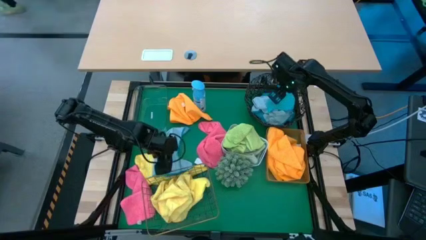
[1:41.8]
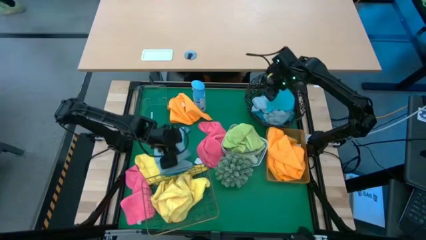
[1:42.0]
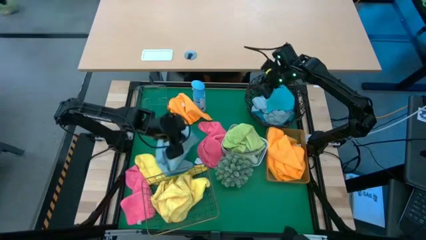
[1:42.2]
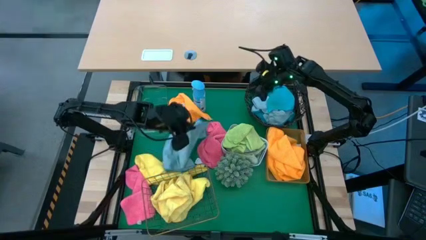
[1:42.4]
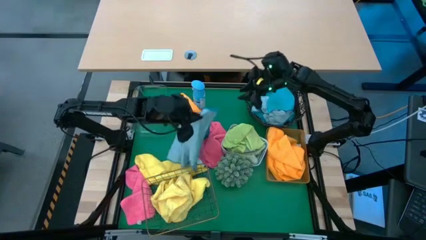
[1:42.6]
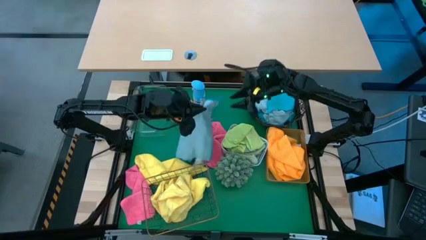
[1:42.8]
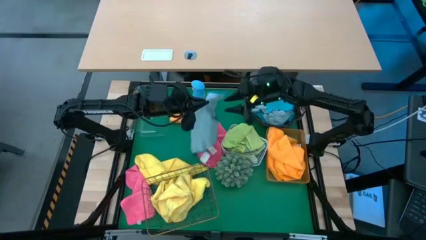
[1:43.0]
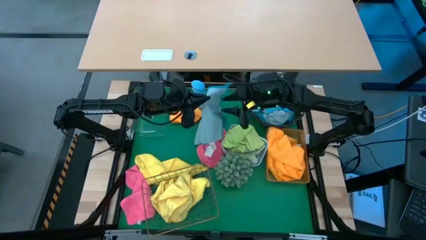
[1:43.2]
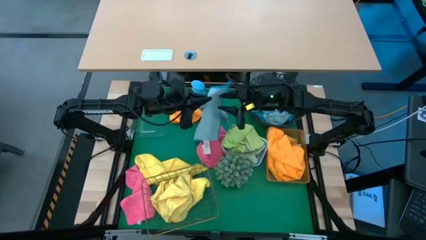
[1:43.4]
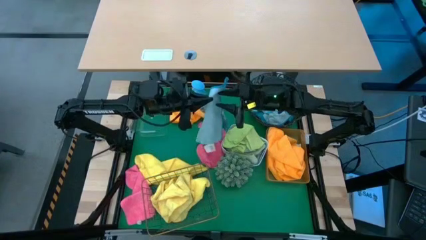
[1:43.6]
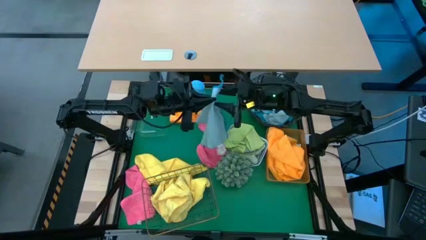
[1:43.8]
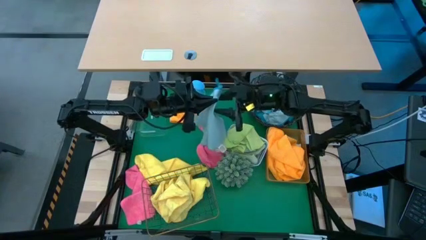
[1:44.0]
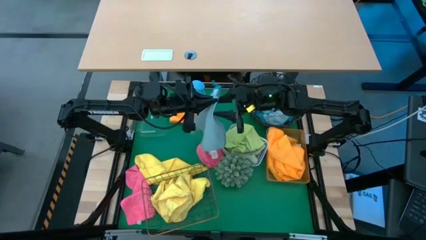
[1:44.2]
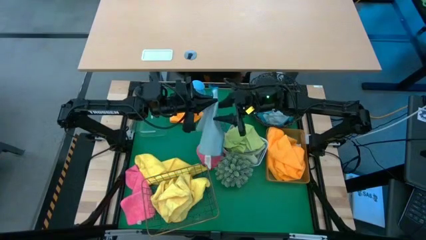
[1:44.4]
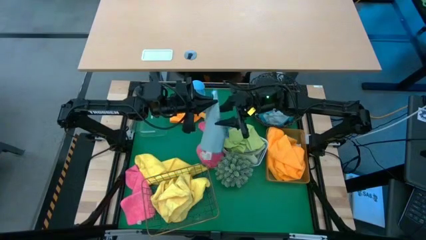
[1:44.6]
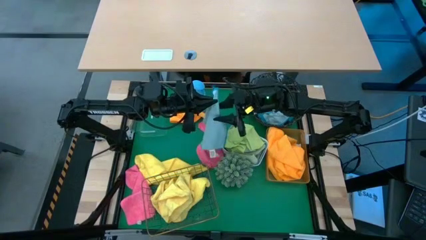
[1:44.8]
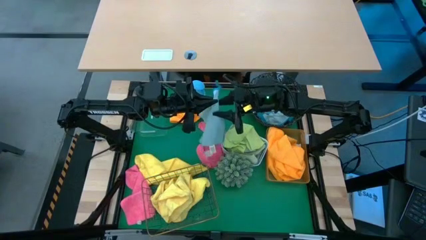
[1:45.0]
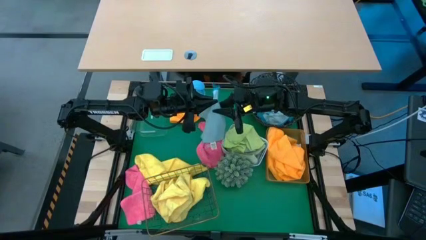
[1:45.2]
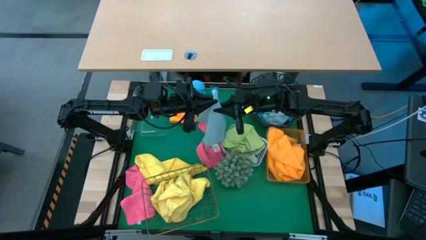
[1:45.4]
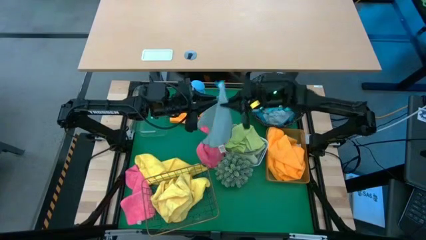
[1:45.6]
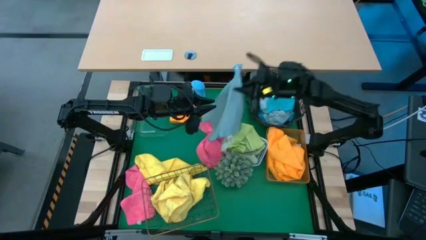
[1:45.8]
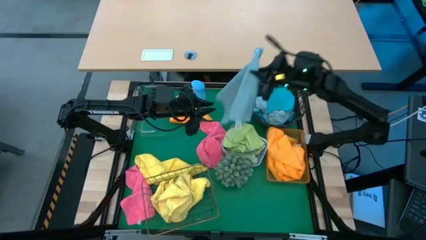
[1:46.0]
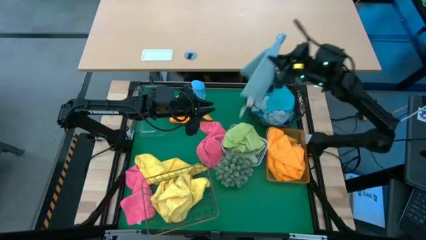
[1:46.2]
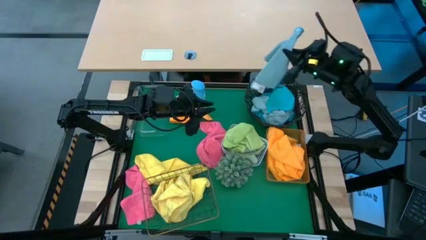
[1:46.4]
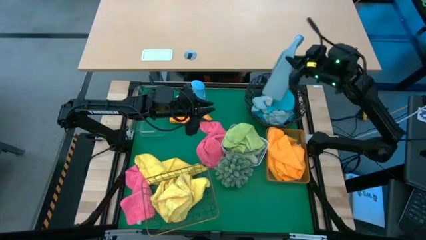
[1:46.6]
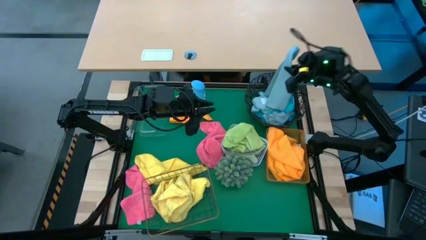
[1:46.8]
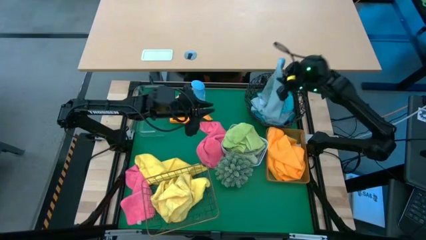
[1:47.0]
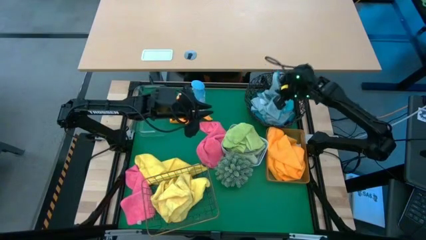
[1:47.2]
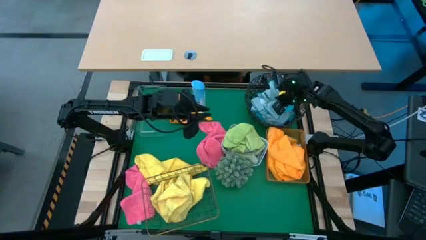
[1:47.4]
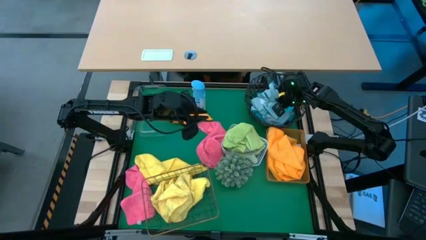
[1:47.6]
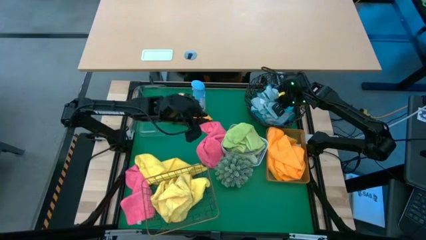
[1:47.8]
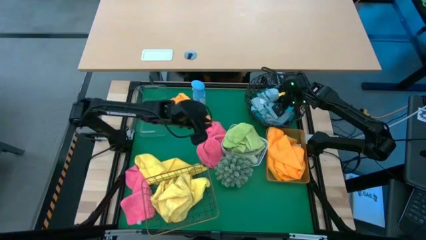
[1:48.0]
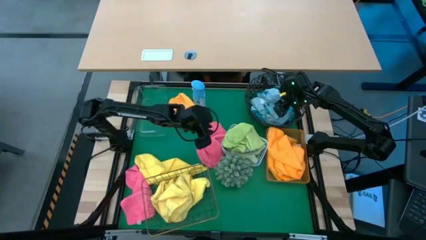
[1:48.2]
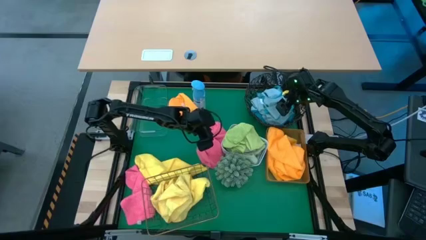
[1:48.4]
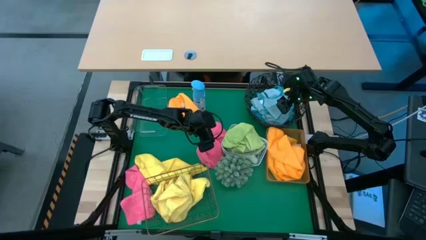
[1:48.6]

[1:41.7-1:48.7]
Task: Sort microfiber towel by color & place in baskets
Put the blue microfiber cloth into the black basket

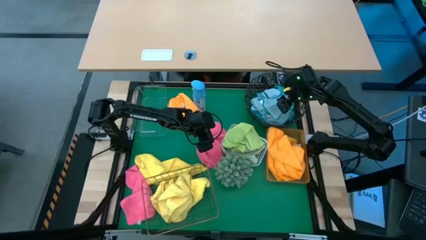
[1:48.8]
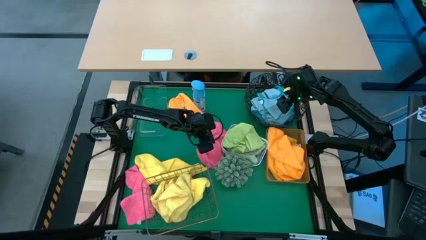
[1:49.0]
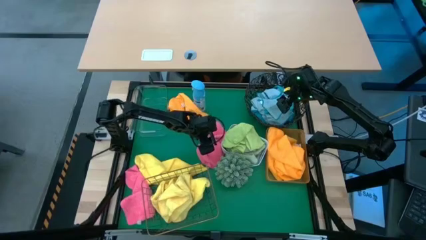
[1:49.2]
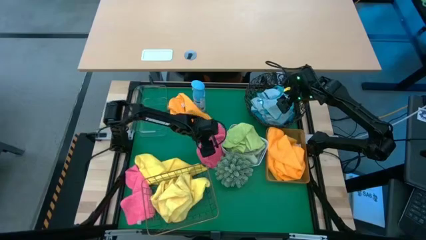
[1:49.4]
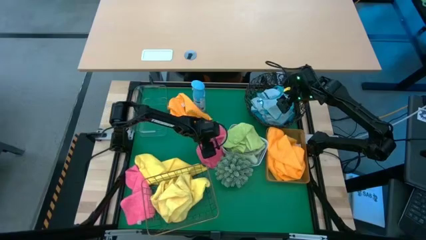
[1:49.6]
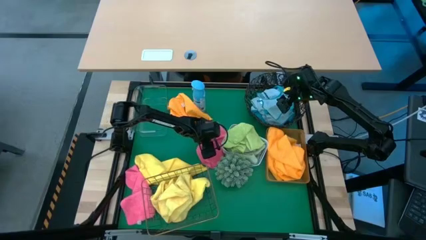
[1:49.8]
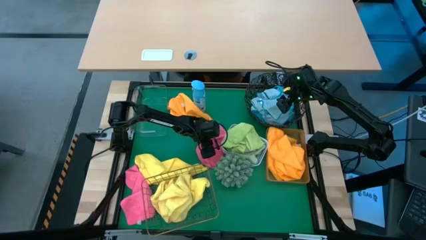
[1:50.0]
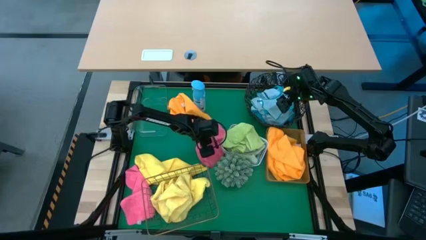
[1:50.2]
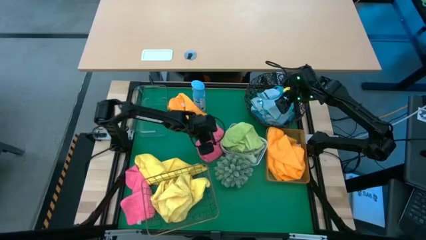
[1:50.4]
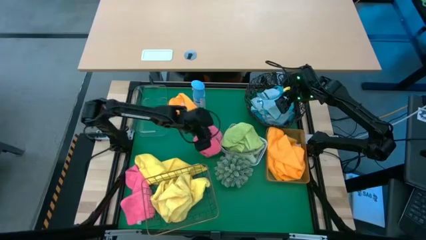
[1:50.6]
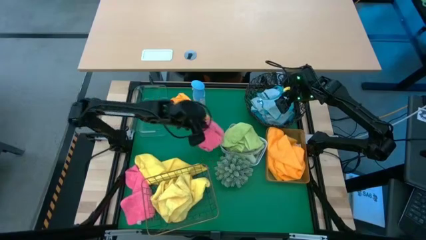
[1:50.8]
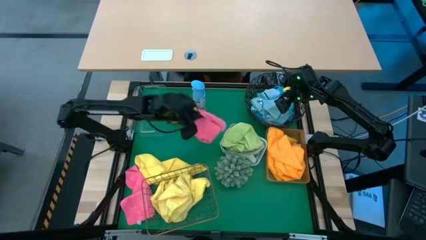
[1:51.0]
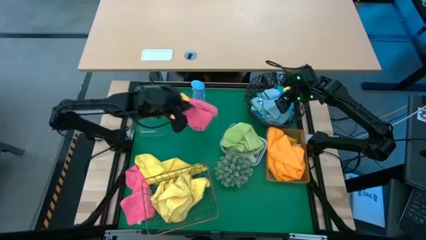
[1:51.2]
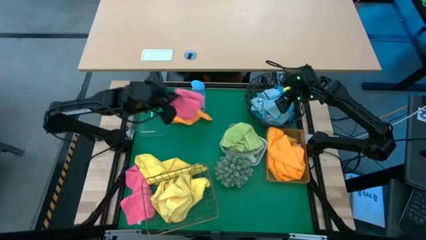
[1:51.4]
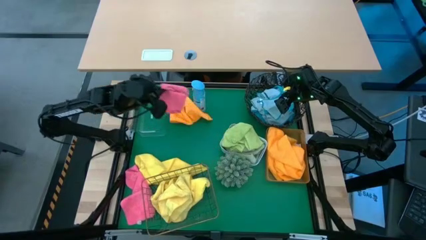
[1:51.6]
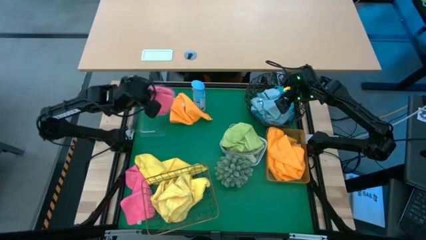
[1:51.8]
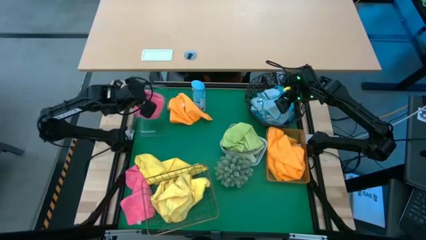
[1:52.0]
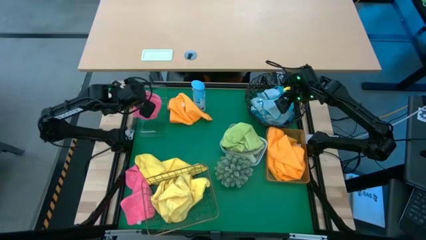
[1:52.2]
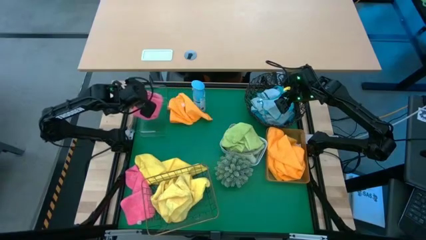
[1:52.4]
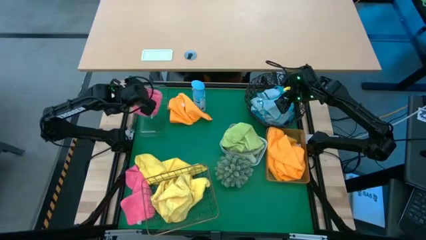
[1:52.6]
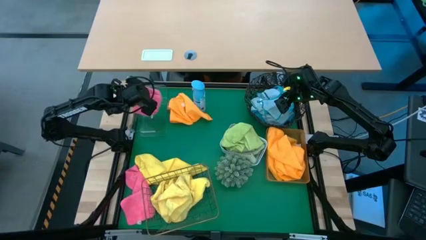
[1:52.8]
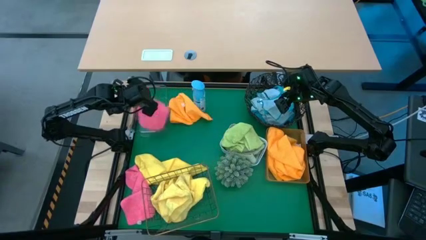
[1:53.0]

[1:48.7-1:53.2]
Put the pink microfiber cloth into the transparent bin

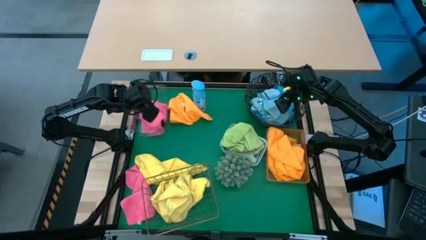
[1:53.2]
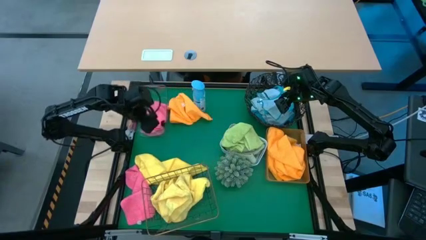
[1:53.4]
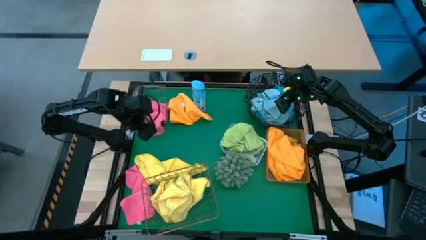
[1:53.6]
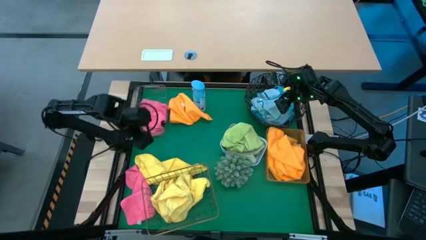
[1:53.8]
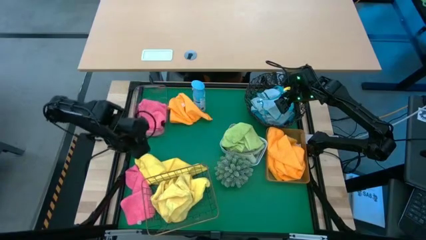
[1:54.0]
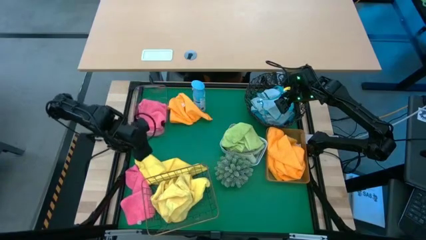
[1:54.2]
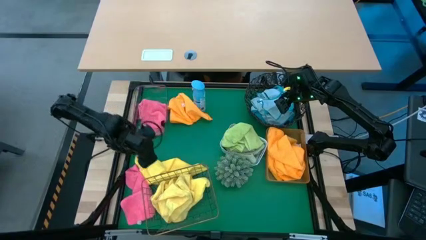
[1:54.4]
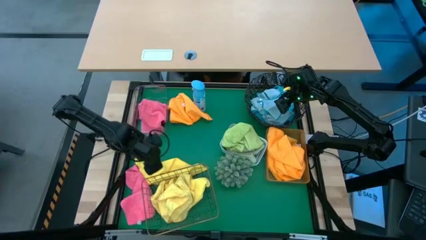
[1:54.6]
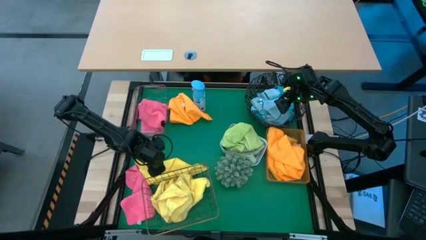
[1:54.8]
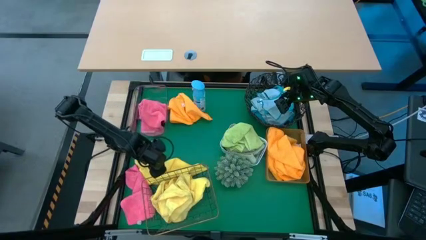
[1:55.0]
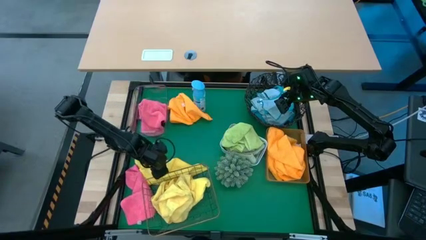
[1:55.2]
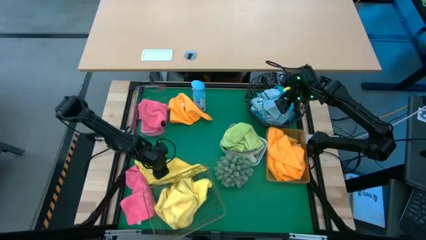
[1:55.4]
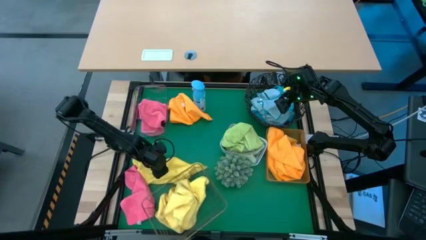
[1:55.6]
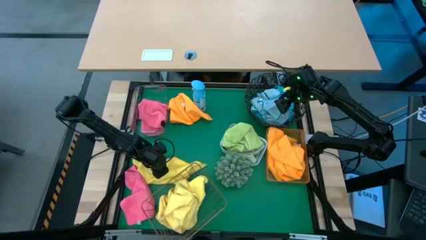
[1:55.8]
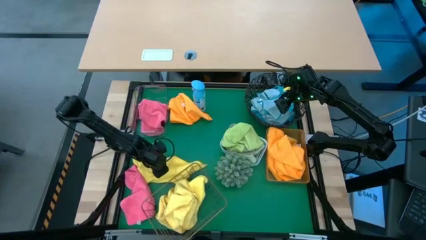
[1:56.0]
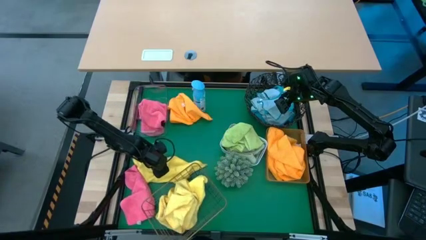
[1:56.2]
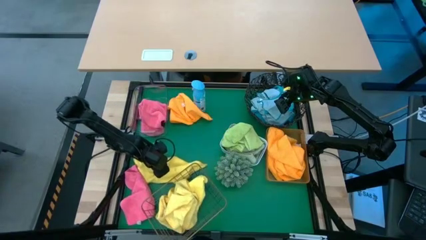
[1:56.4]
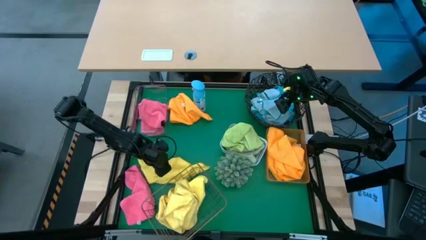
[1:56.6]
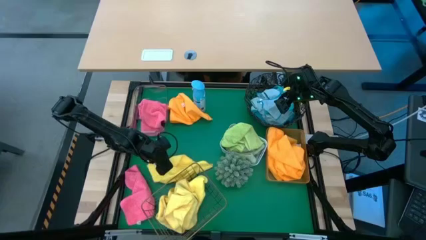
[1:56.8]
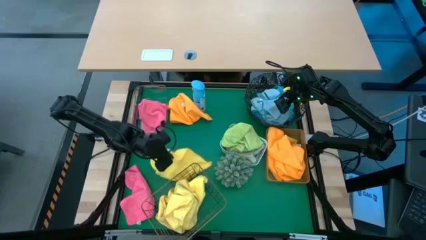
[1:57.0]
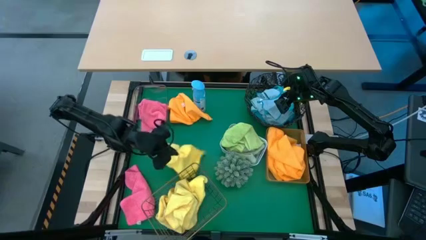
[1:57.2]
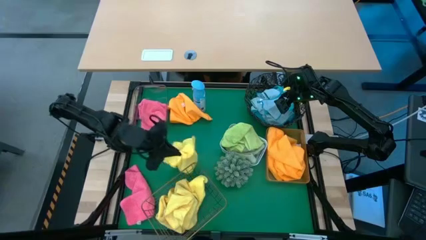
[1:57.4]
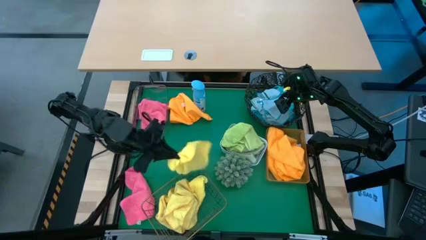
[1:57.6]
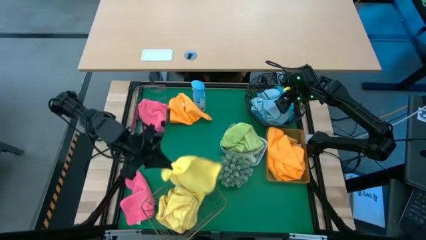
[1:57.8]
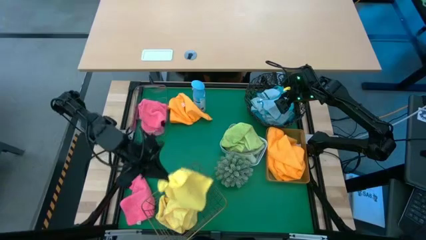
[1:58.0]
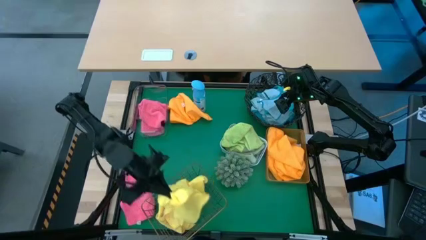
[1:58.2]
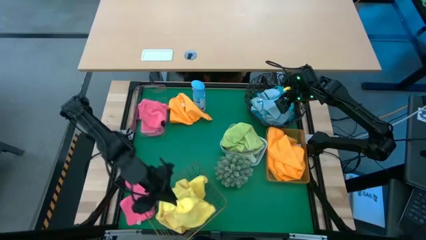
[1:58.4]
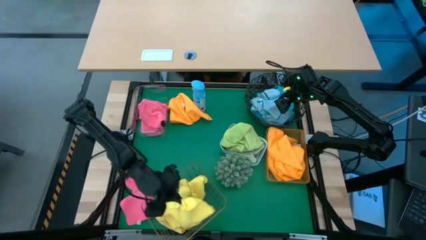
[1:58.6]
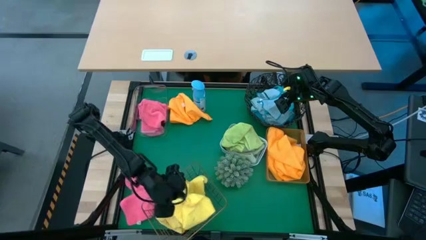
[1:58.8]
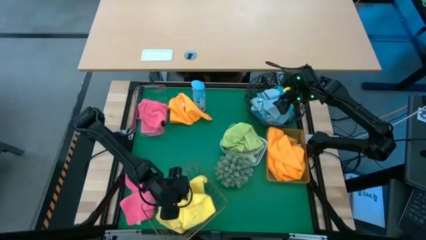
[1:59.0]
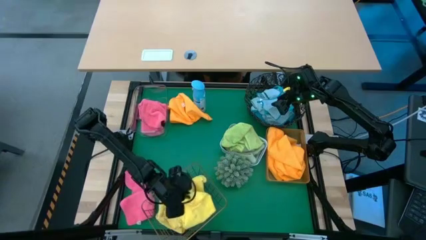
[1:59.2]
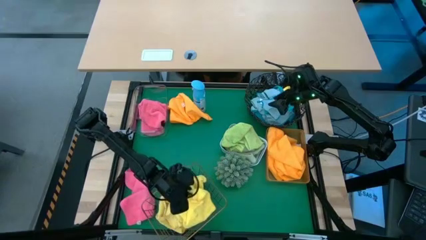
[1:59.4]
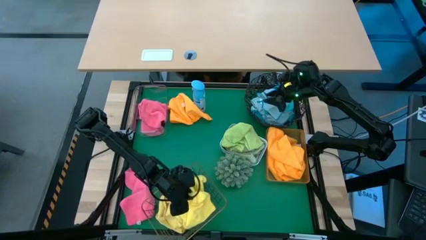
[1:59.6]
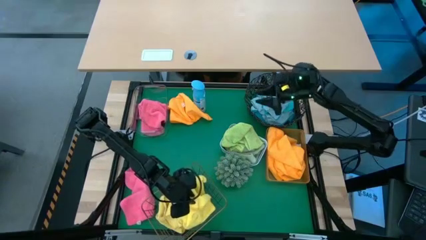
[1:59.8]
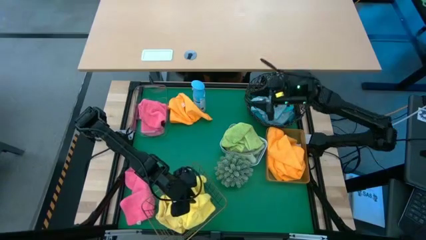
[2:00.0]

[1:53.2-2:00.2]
Put the yellow microfiber cloth into the gold wire basket
